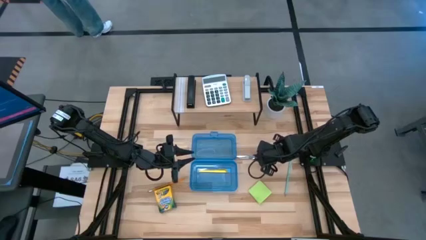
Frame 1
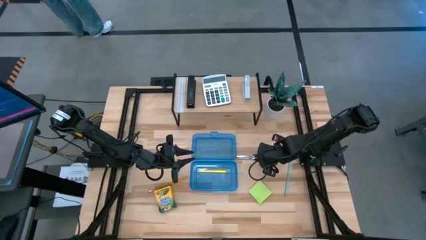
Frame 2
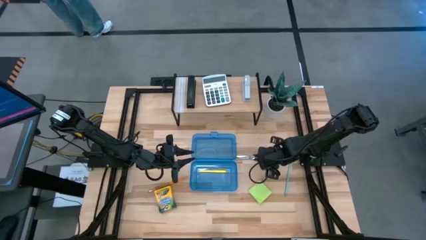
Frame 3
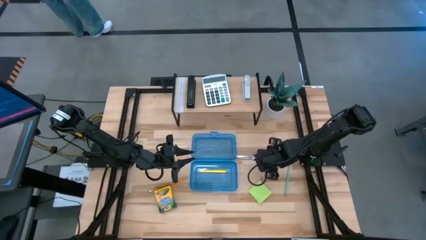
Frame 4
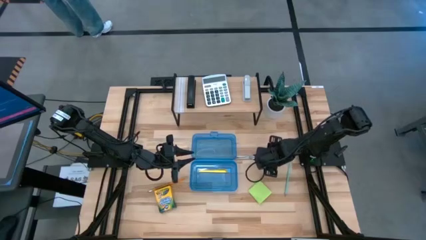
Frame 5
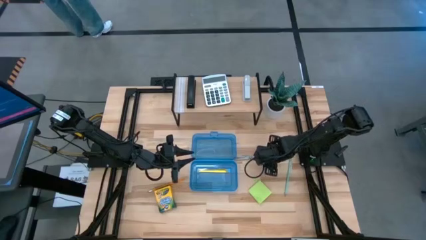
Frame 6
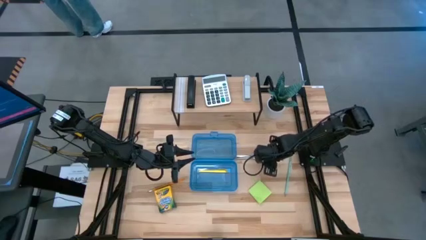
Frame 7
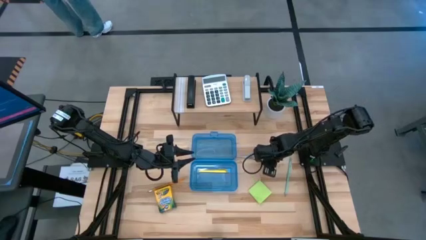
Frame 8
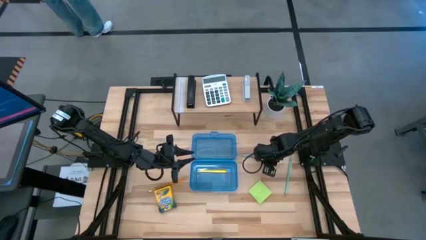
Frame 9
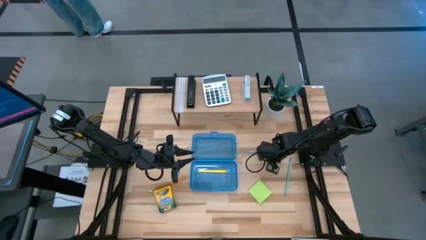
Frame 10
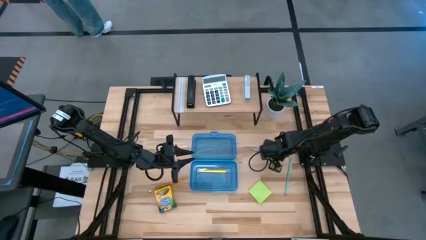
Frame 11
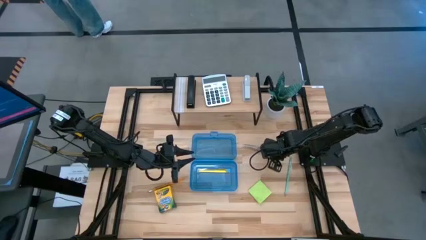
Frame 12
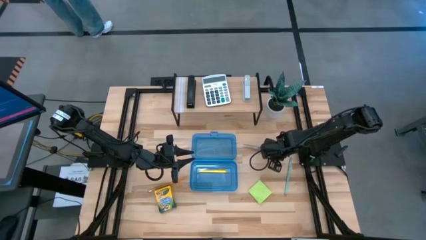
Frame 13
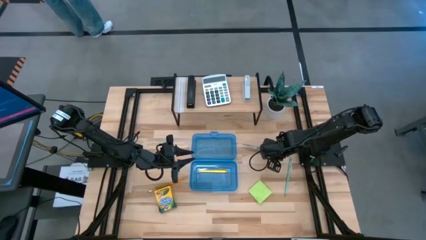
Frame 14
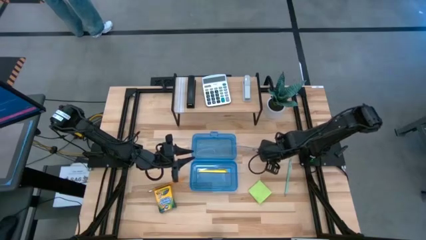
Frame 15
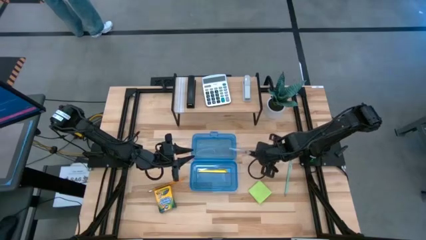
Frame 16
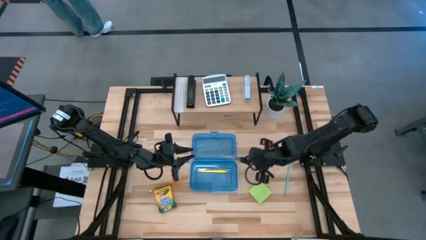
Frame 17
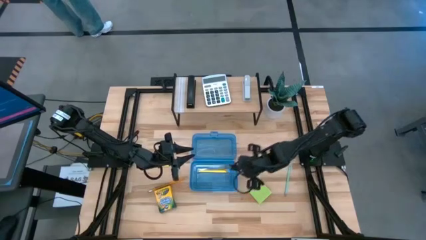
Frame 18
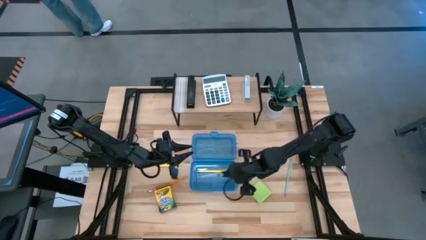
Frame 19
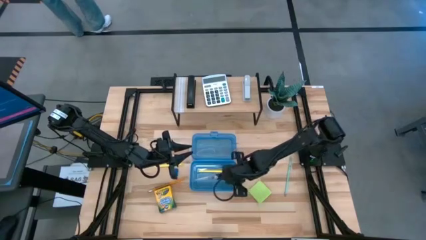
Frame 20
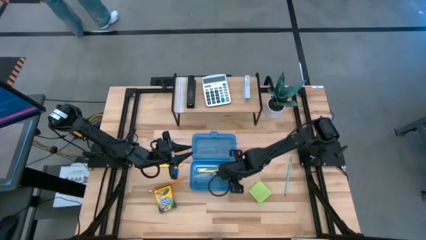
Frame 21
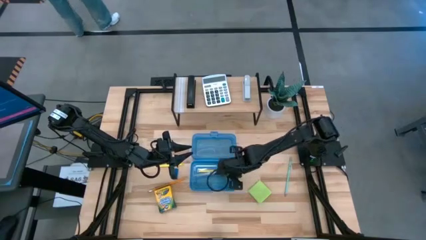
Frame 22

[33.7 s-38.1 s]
Task: Pack school essentials
Put the black scissors into the blue supply box

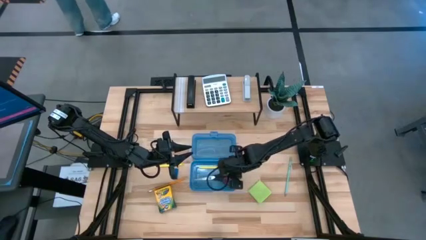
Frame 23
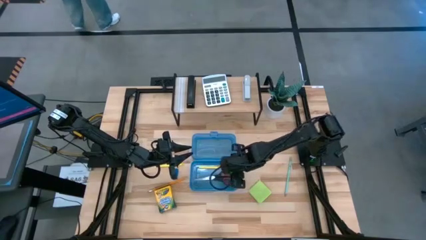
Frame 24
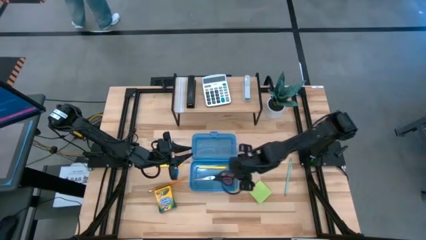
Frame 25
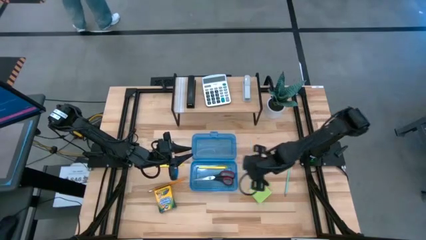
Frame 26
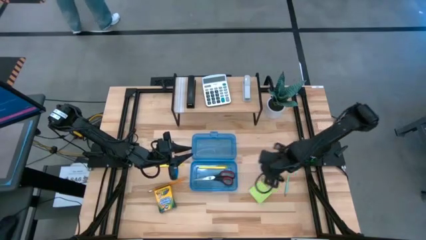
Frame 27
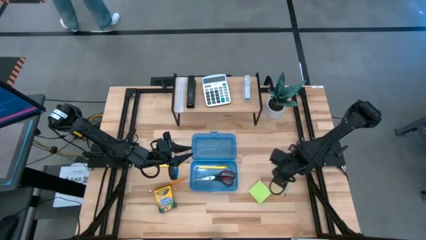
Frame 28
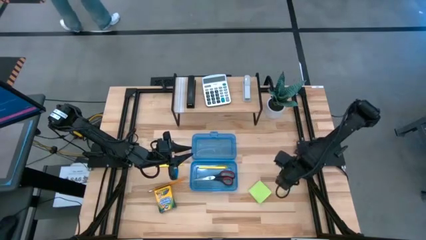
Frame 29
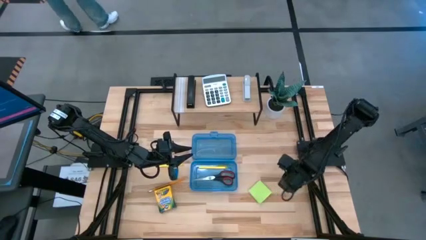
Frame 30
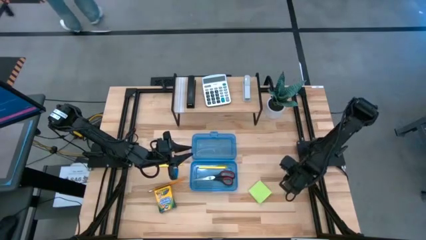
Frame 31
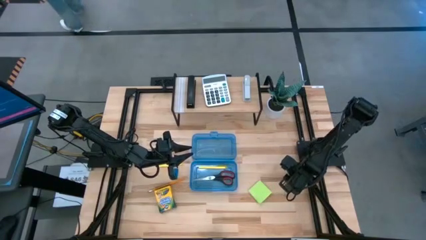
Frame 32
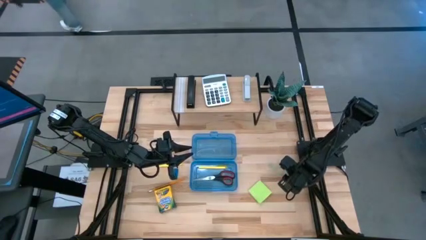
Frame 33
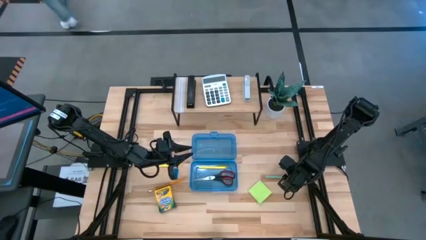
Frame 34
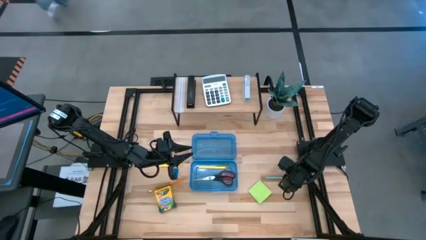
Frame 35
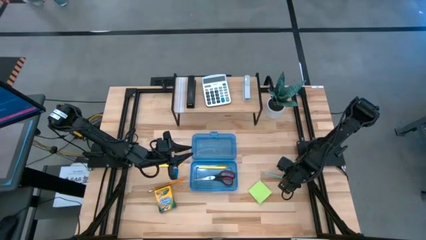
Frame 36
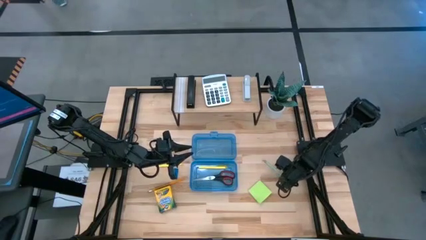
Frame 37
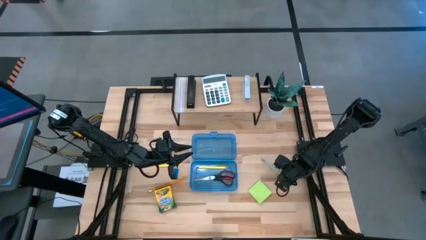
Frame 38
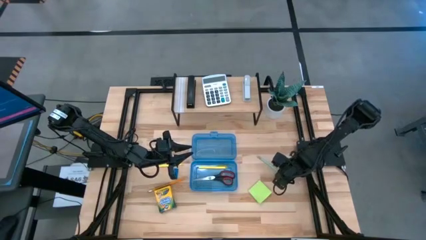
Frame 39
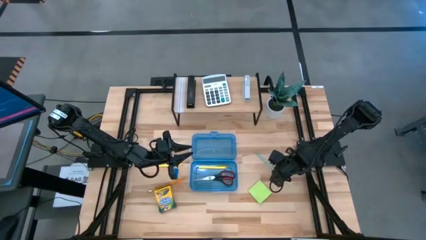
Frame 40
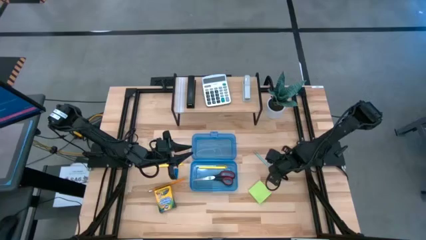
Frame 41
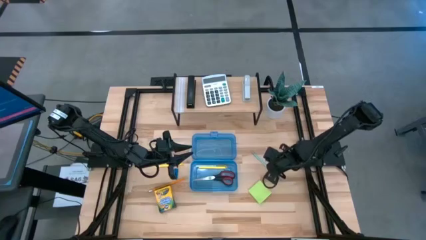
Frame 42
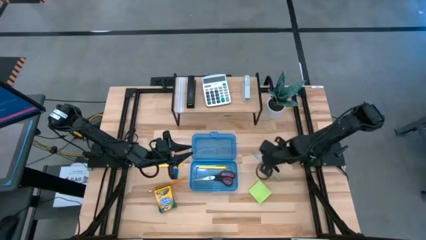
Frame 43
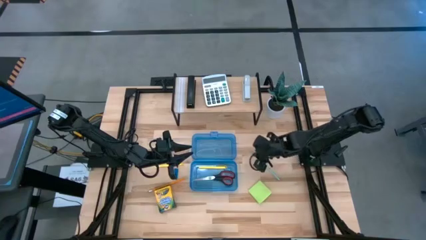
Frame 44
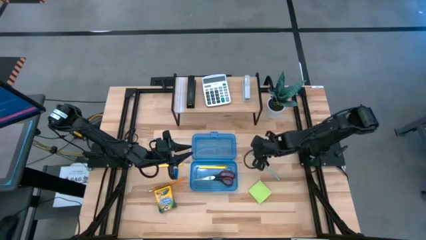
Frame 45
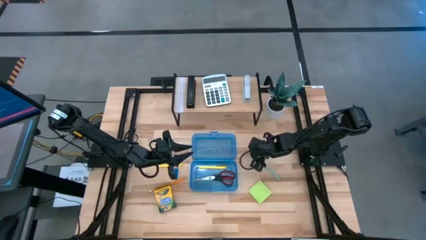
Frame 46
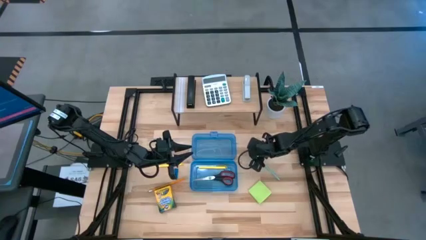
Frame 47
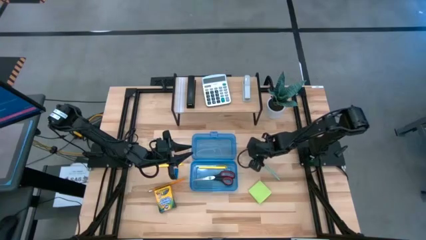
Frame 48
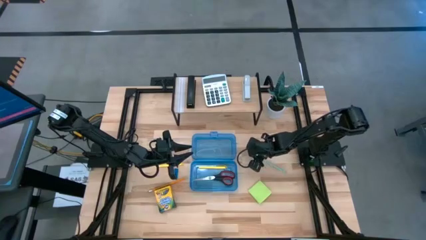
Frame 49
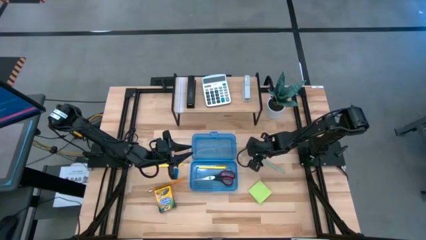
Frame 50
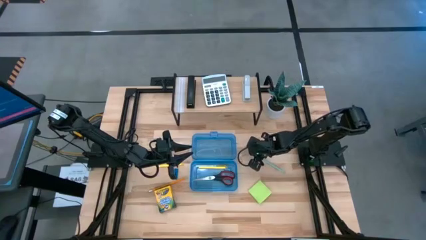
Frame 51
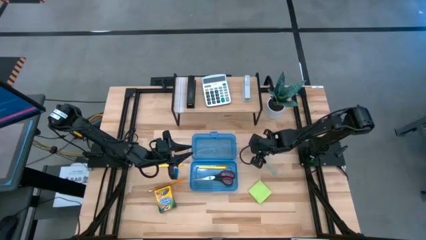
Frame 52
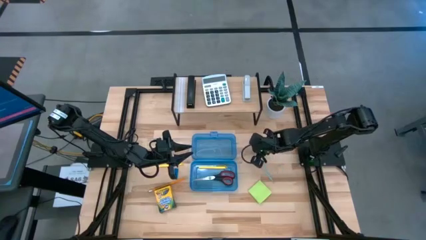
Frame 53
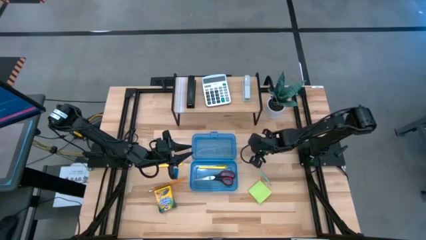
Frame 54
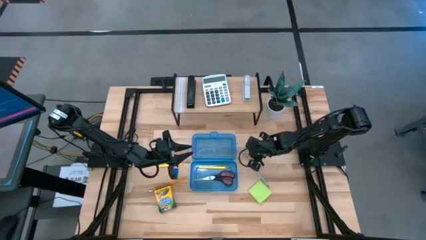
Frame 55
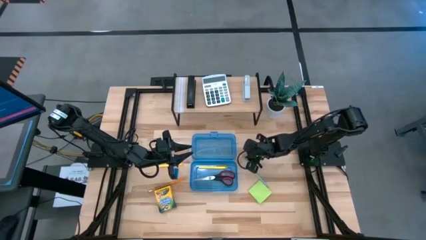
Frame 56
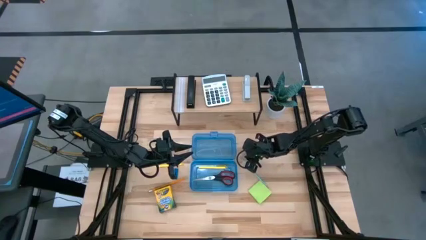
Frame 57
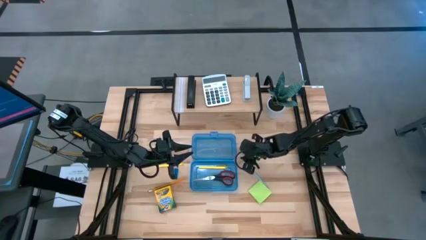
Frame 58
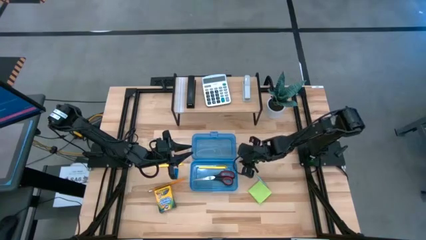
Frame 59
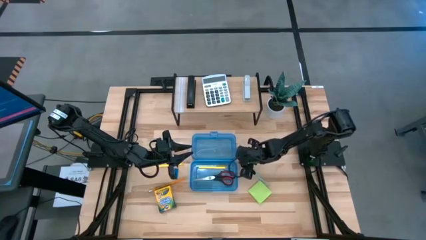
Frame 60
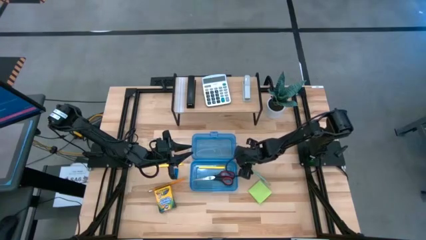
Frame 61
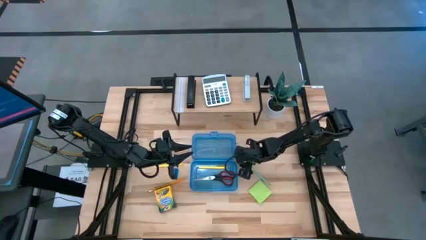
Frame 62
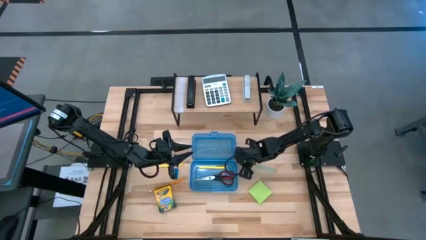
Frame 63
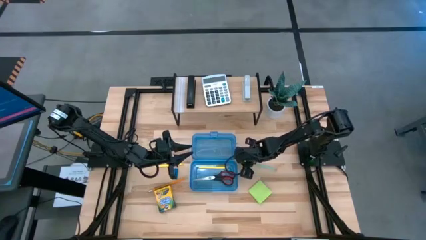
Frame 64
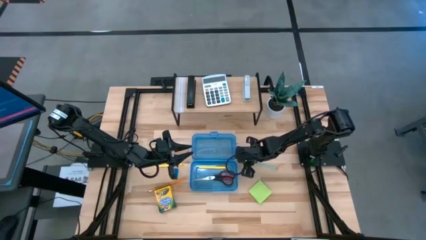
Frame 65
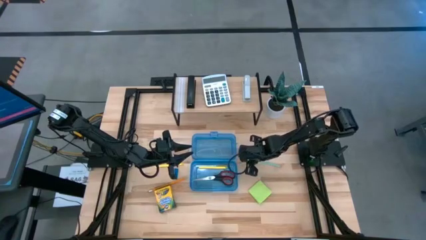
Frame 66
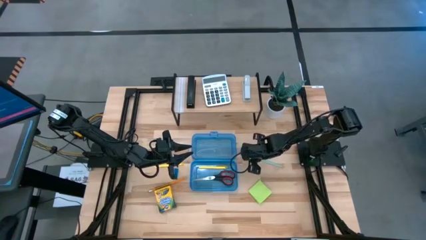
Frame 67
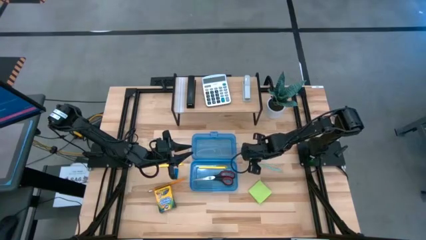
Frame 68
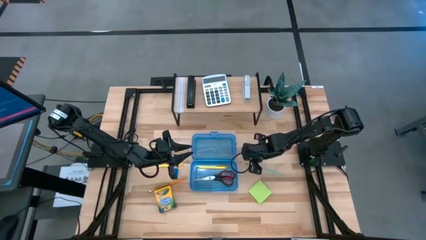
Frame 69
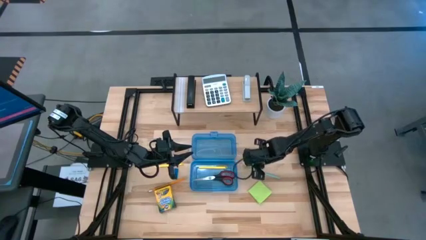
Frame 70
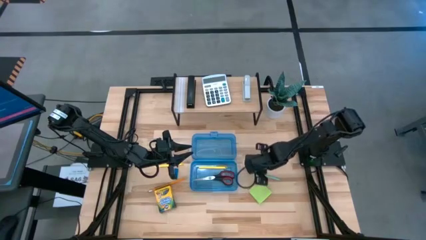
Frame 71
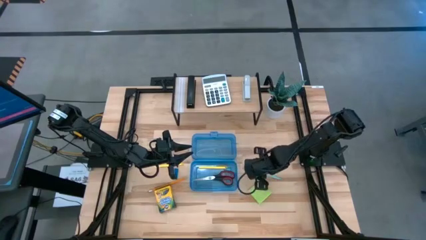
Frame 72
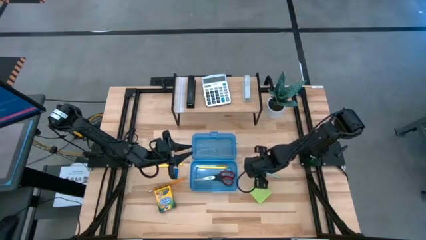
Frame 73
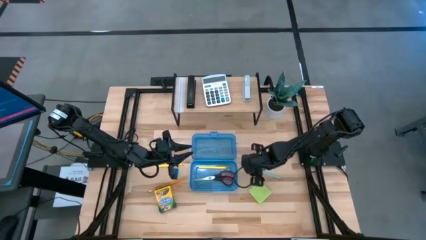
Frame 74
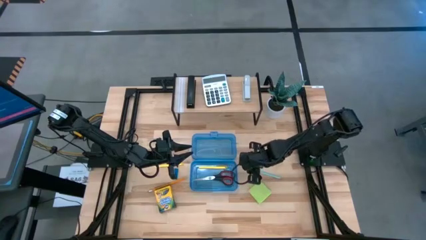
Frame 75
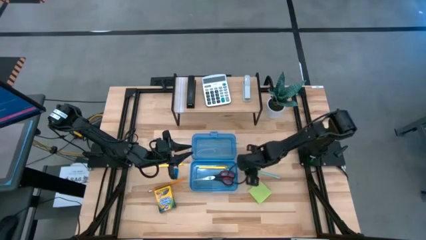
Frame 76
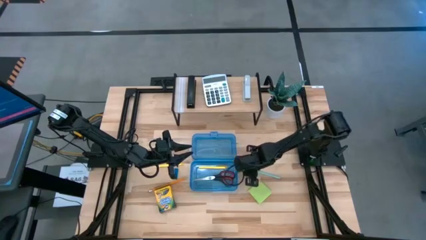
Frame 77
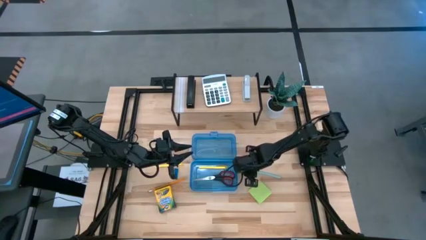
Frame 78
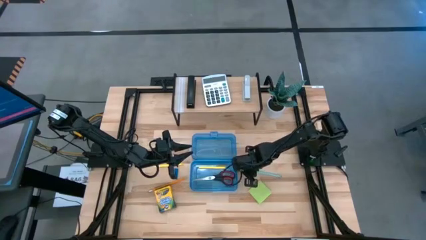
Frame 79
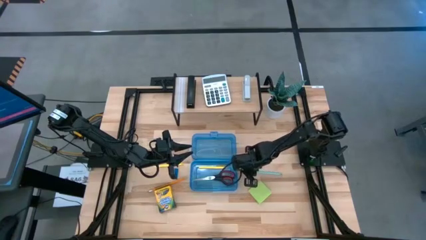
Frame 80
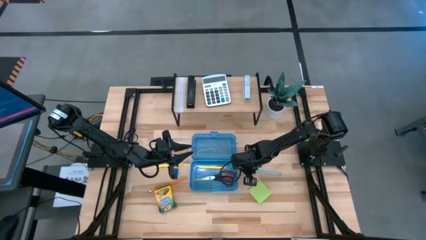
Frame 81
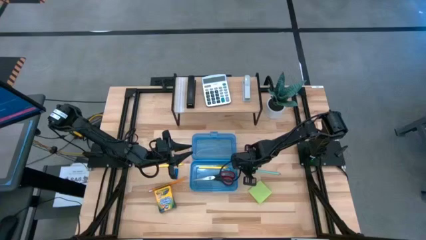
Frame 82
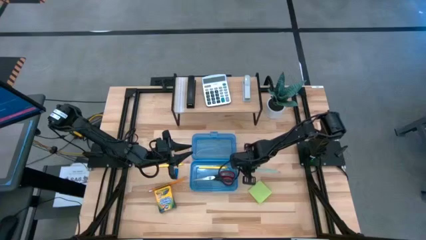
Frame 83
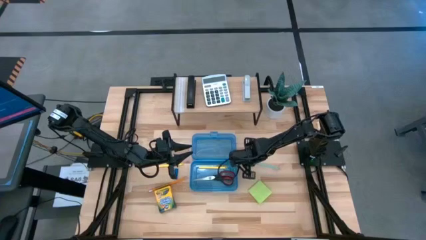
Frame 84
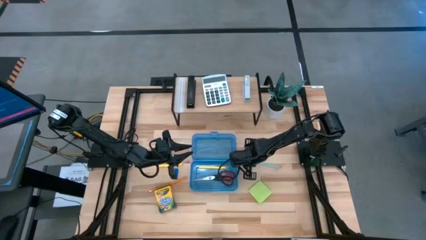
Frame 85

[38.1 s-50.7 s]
Put the blue pencil into the blue supply box
